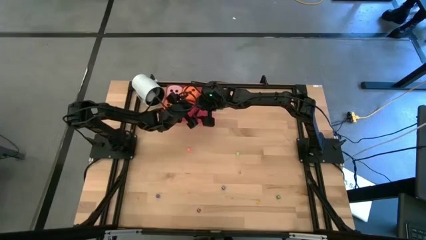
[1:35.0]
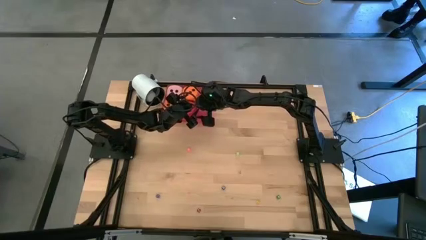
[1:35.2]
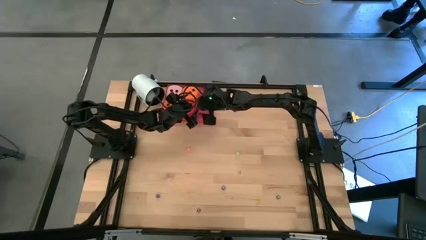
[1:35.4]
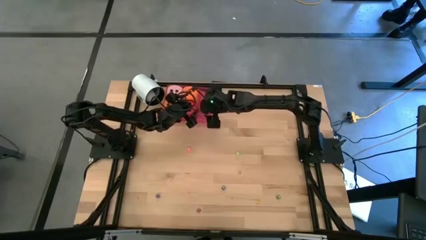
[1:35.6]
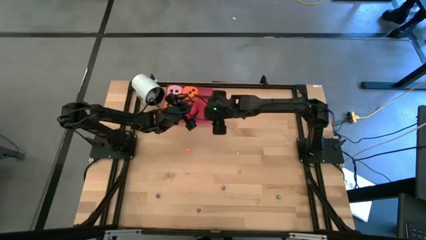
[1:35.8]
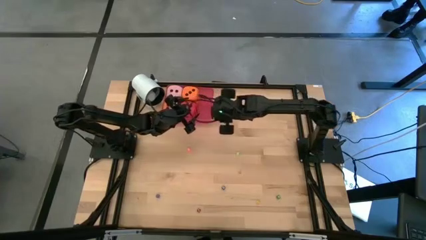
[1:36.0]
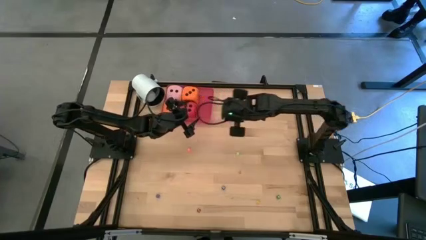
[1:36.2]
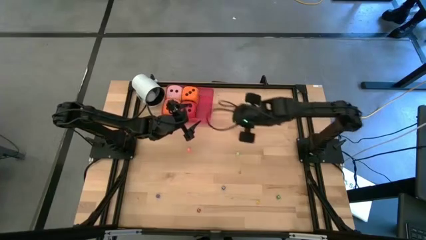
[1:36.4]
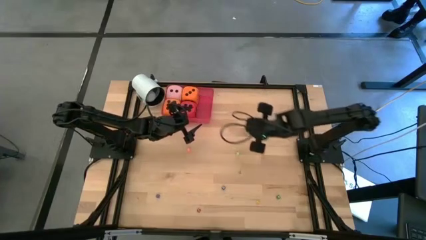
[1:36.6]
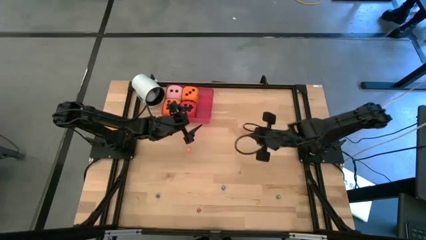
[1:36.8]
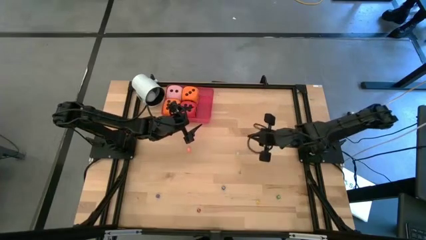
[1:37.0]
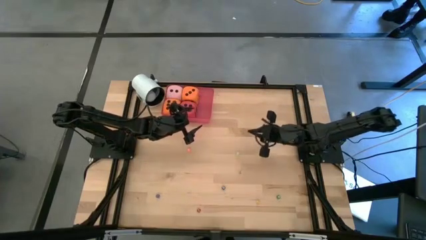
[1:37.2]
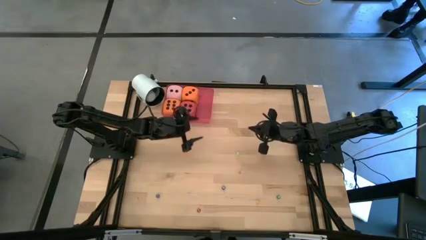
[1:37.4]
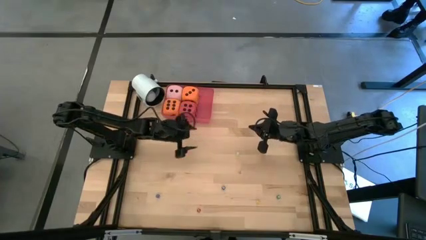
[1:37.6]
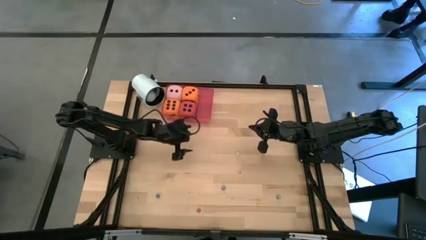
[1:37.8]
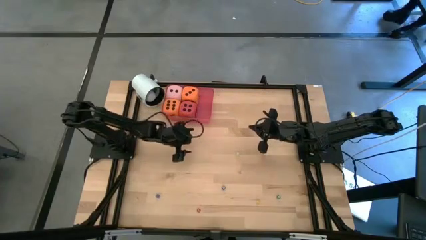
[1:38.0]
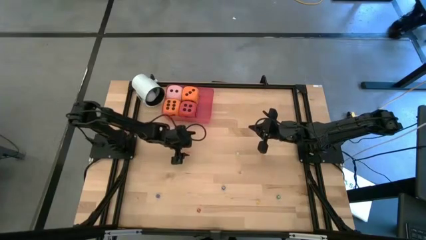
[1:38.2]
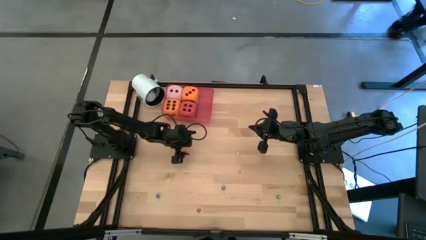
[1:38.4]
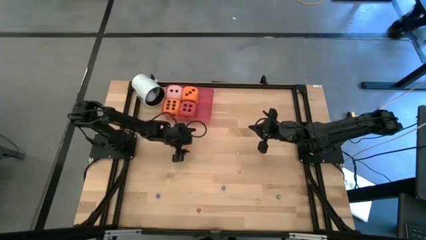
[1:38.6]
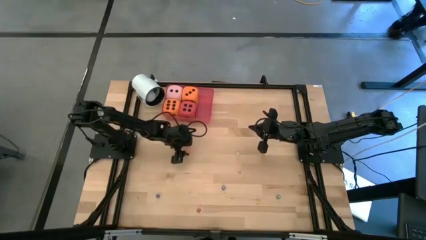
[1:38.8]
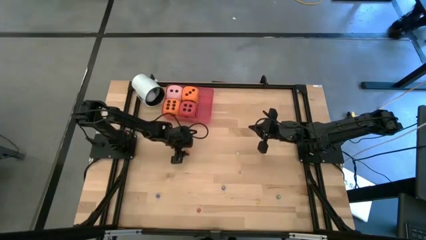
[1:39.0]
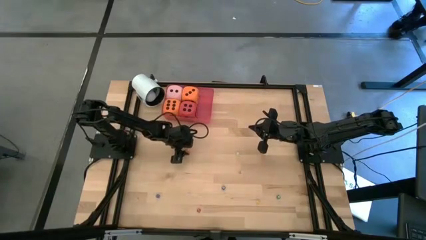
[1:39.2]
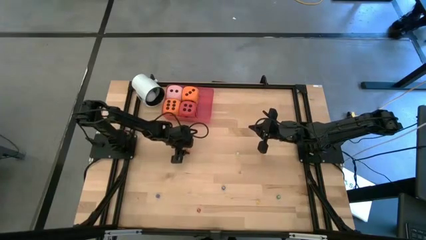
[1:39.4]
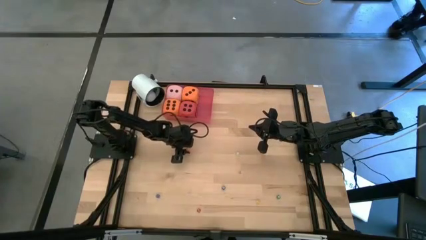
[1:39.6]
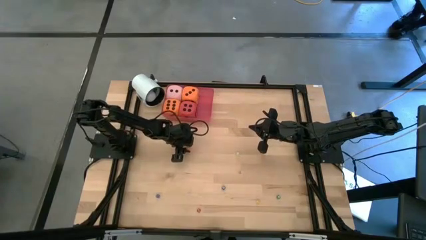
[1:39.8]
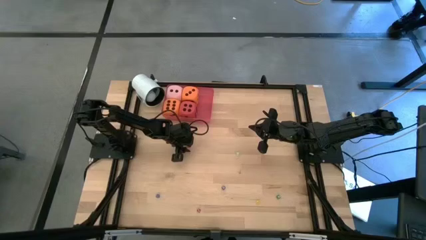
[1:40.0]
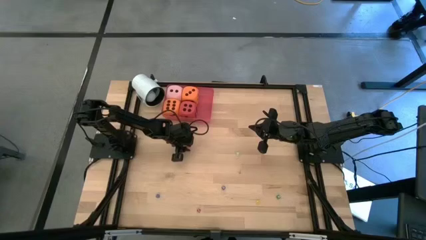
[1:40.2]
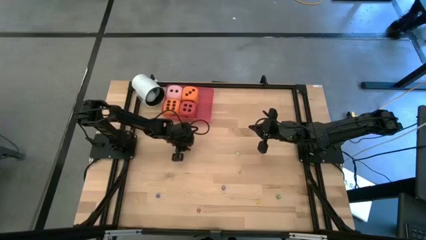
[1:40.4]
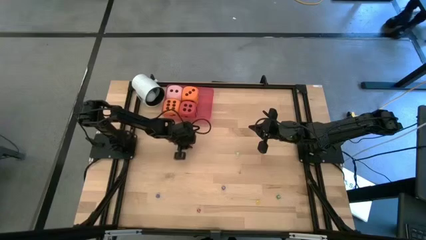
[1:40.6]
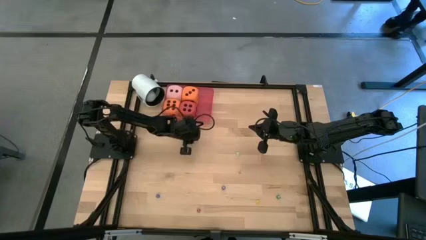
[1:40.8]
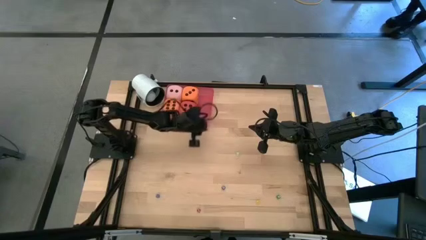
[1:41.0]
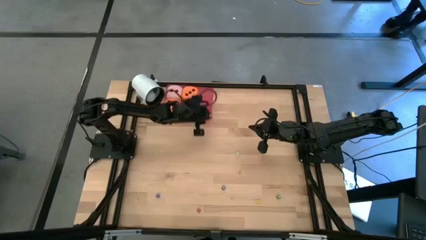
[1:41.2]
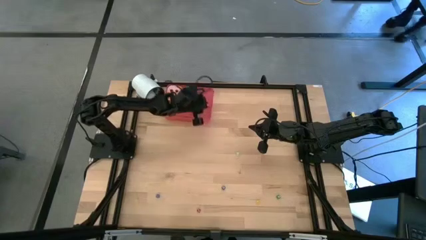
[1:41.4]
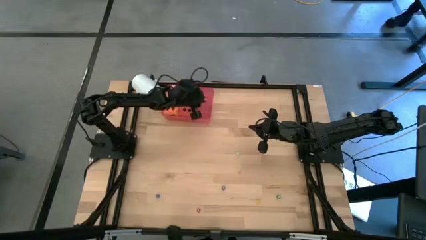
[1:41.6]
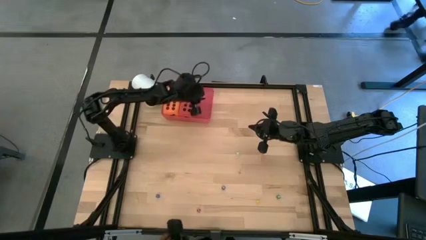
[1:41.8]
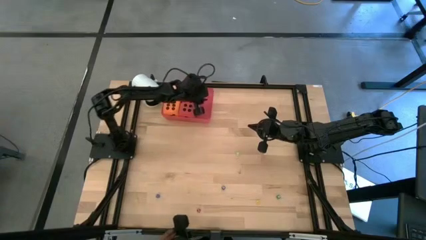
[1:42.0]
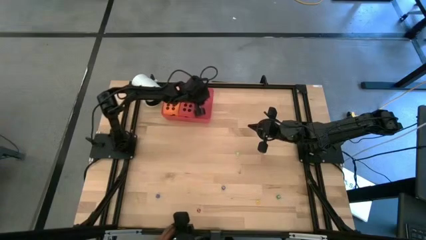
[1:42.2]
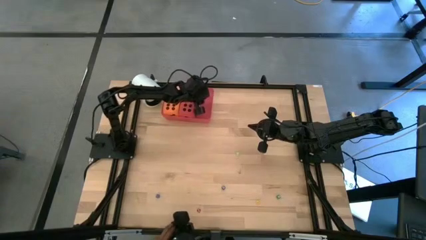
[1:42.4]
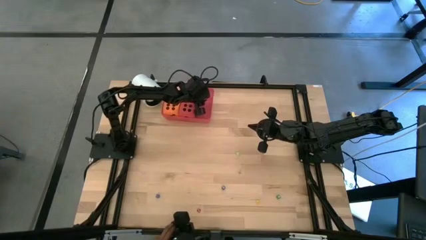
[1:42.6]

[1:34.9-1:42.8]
Task: Pick & Place Dice
Put the small orange die into the red bin

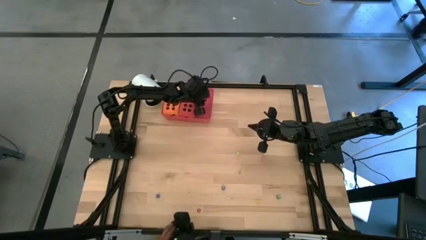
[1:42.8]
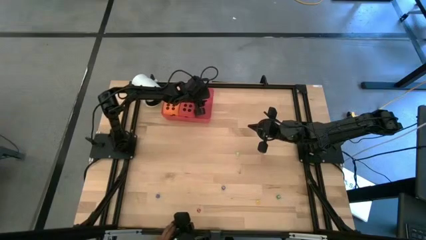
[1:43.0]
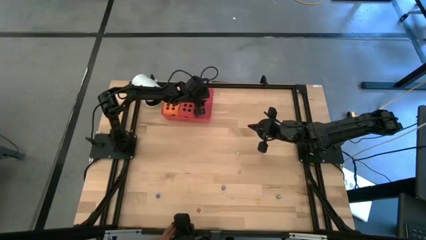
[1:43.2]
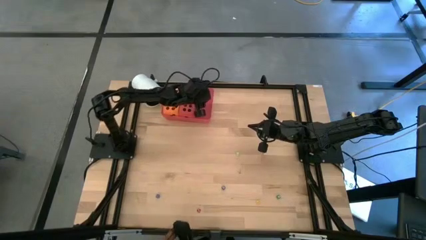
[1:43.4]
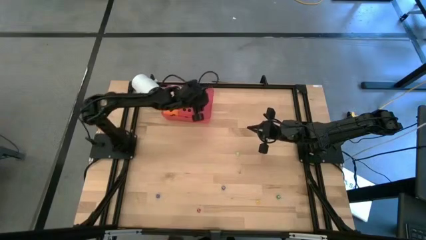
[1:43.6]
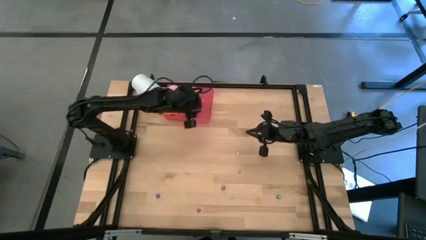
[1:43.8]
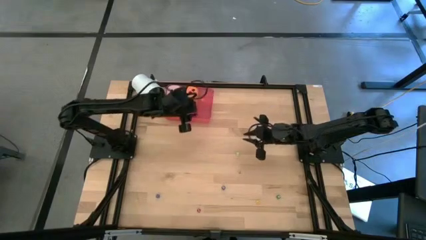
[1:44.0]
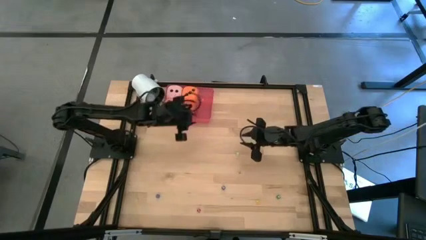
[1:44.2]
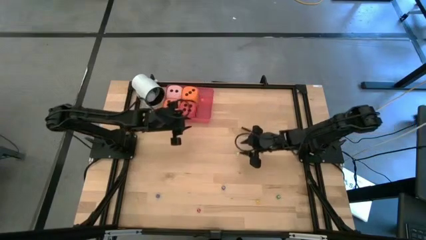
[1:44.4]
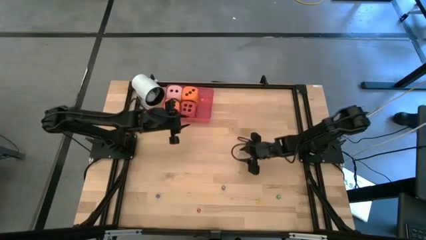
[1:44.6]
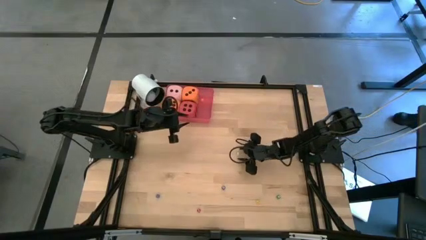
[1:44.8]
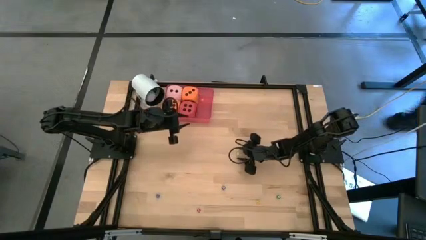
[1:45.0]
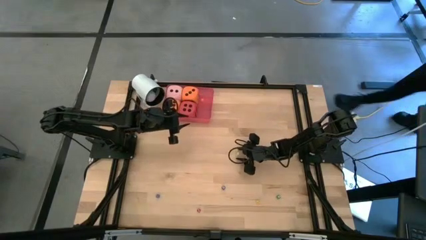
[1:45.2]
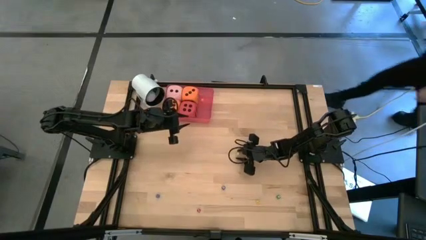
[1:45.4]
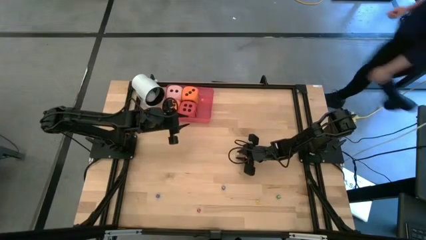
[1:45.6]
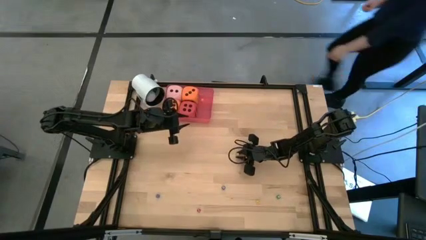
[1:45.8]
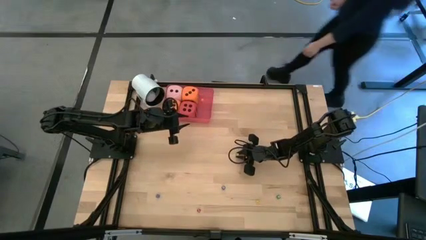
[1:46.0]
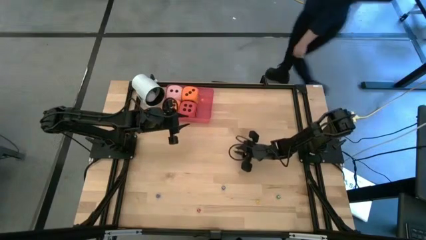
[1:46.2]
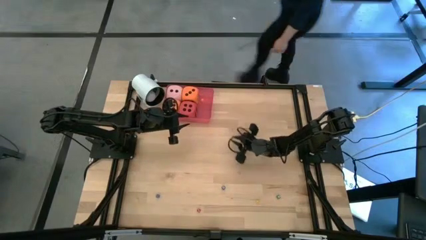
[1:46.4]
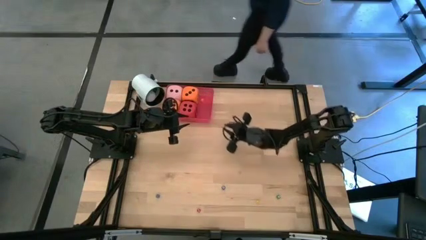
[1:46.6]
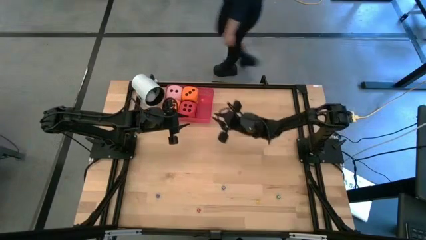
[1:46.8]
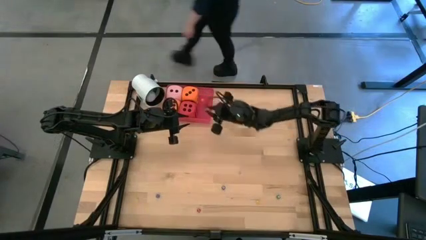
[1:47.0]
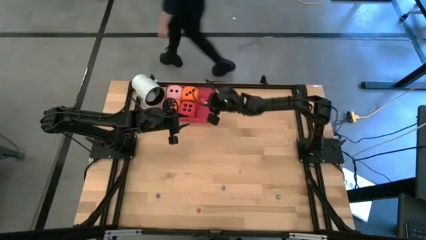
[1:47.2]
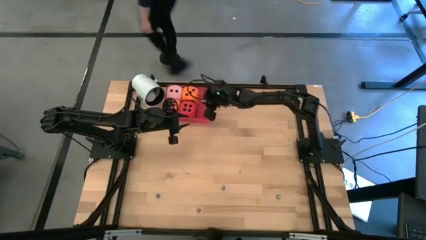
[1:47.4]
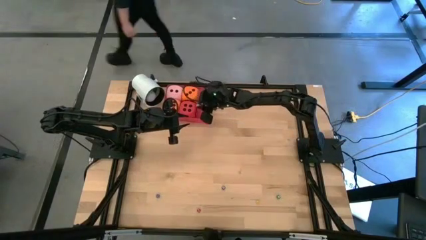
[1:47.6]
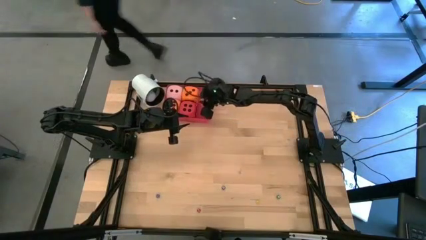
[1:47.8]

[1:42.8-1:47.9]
Put the small light green die into the red bin

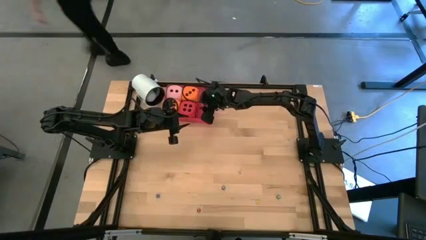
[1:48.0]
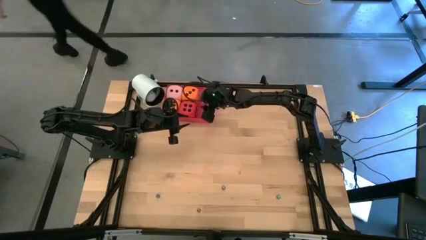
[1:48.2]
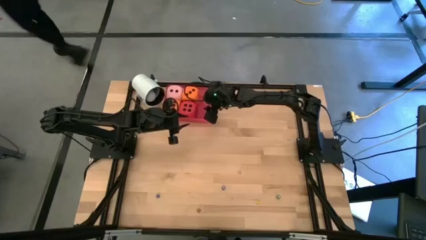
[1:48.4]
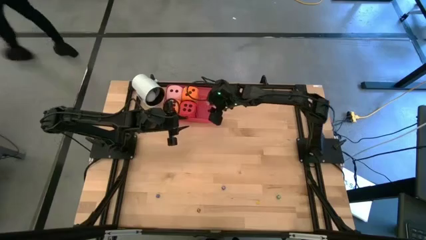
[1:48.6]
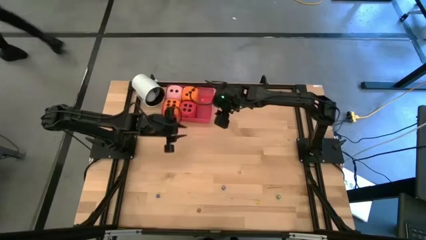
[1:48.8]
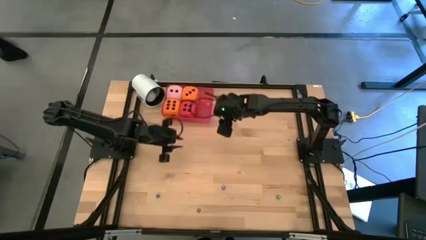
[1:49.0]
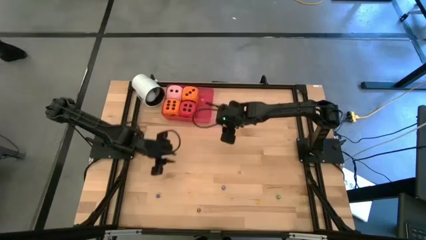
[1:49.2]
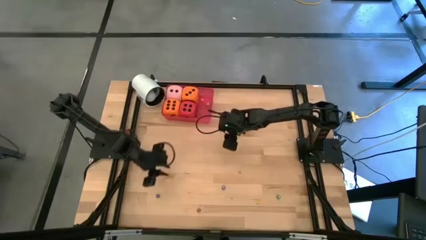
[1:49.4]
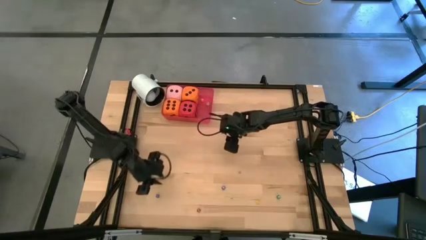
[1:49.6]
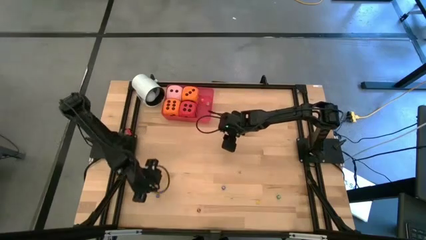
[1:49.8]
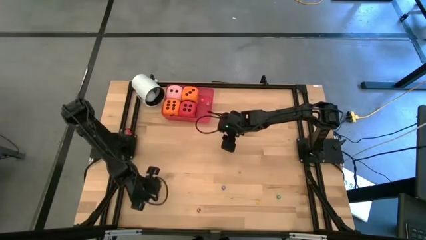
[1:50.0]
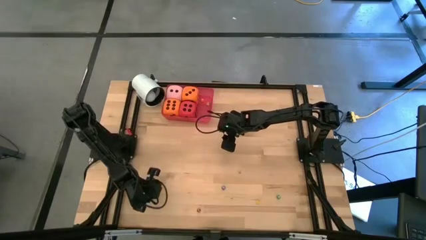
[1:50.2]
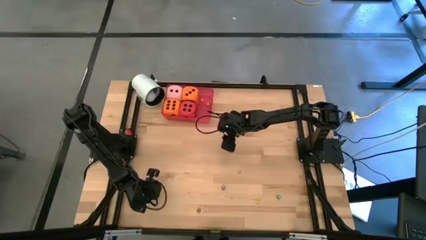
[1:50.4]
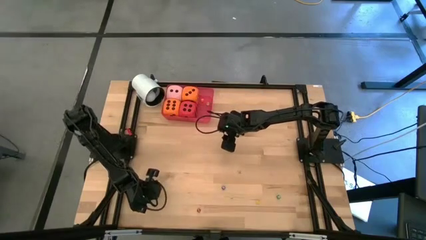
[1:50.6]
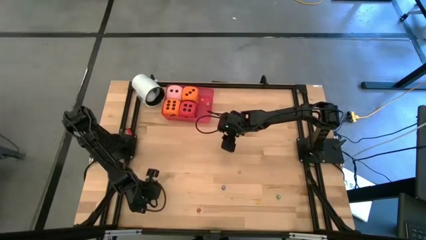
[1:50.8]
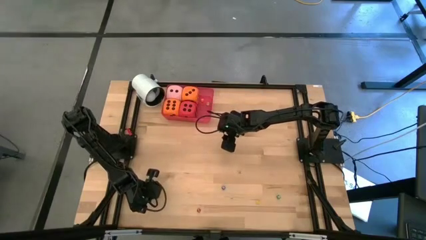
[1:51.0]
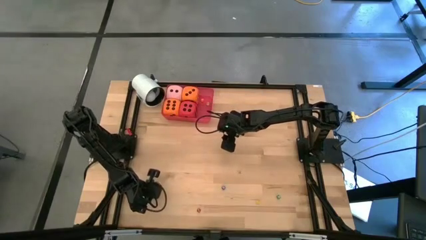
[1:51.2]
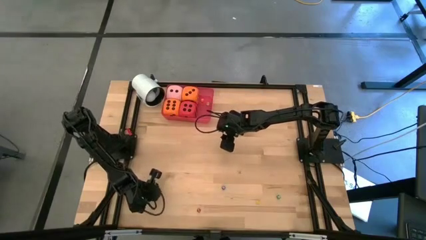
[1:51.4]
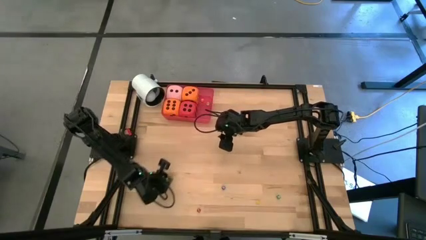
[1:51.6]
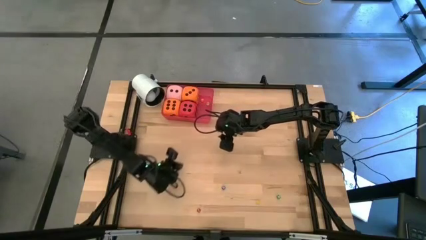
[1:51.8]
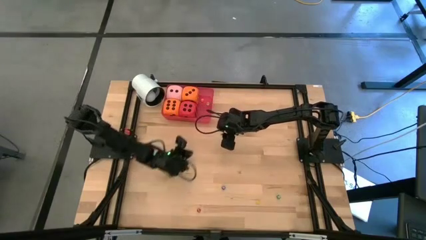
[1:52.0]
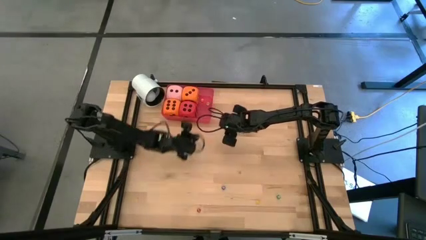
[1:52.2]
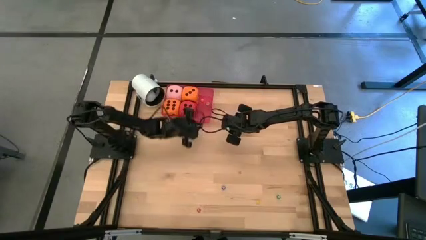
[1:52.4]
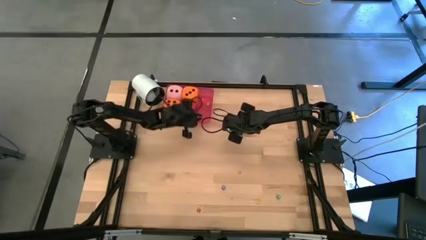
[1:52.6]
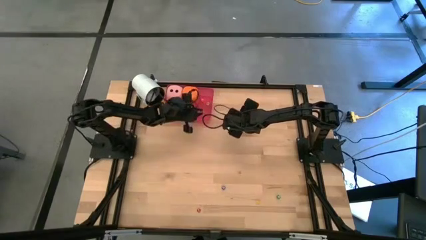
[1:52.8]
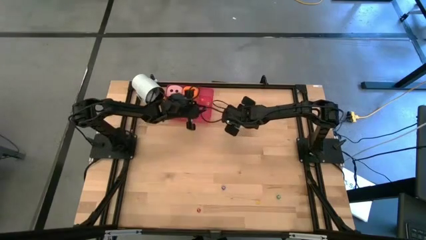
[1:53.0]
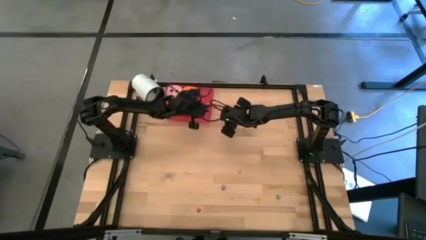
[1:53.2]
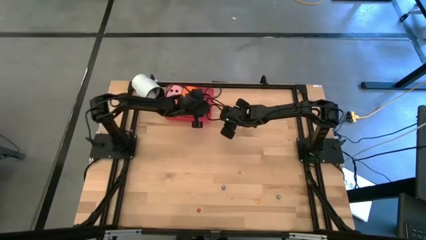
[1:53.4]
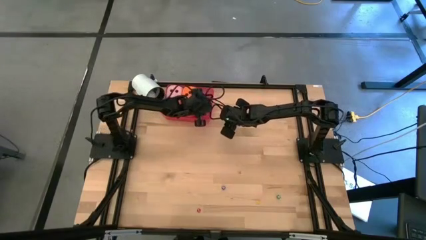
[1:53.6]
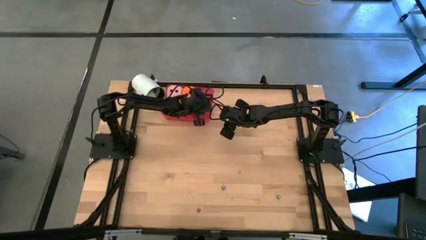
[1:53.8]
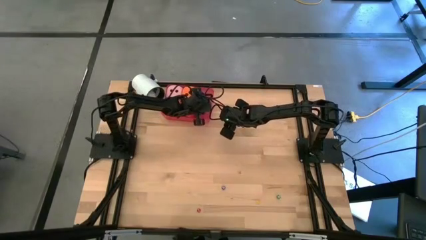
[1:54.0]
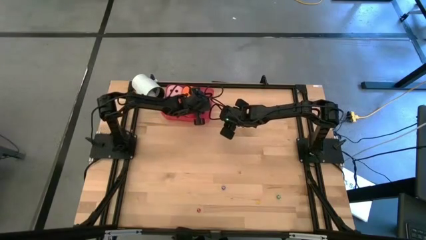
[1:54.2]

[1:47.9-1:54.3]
Put the left small blue die into the red bin
